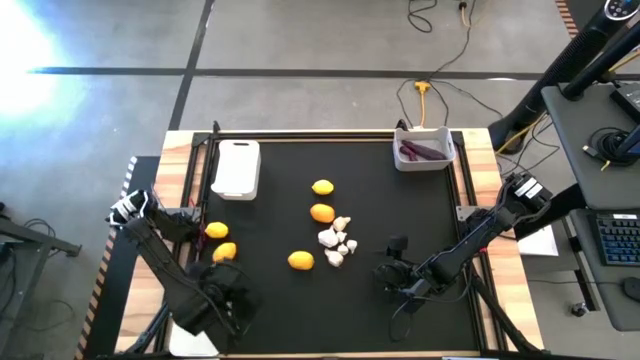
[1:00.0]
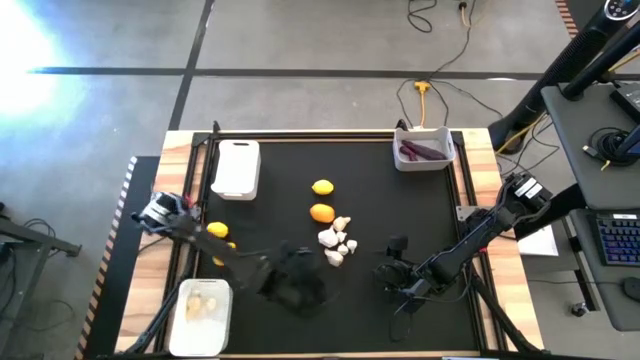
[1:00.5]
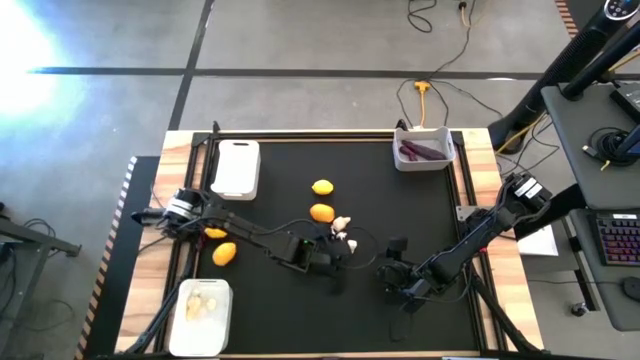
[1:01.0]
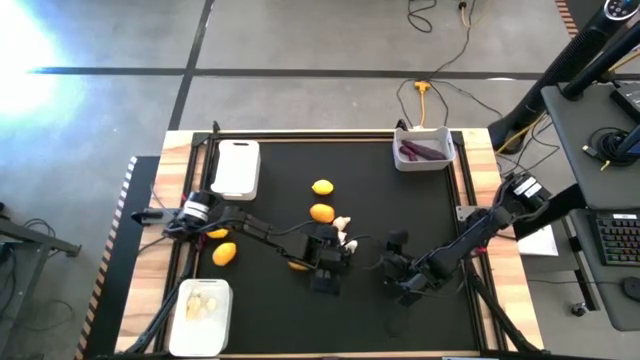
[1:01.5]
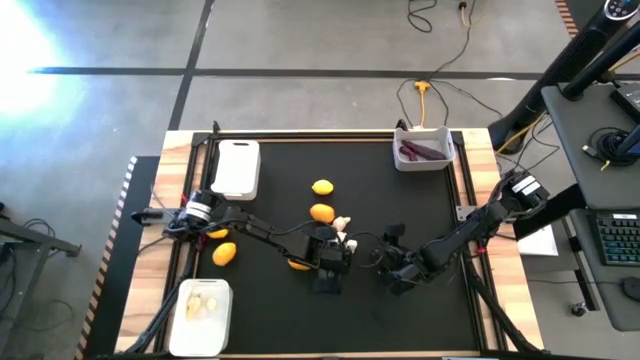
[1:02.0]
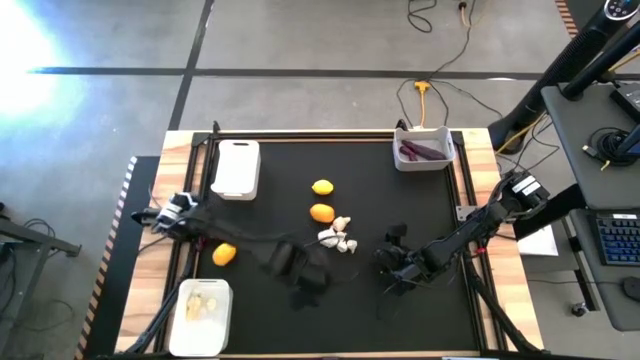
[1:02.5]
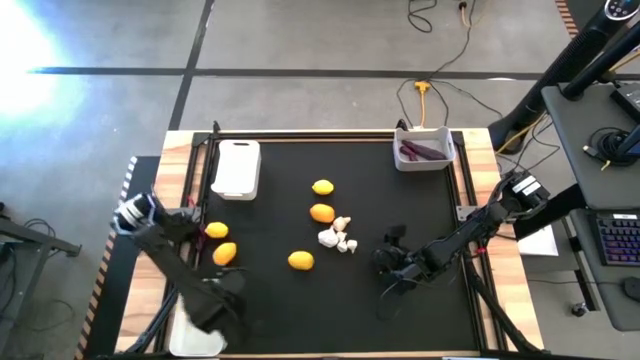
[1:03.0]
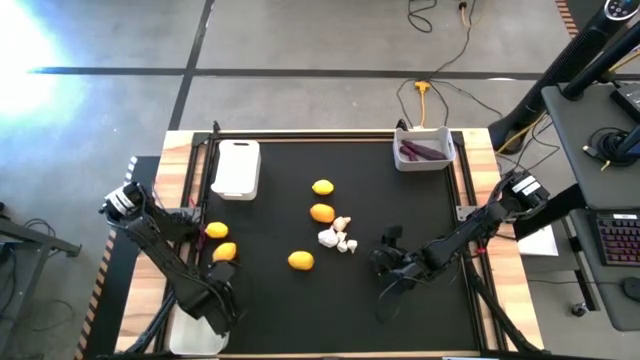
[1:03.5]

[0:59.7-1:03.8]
Task: Sort produce into baskets
Put the big garlic into the bottom white bin

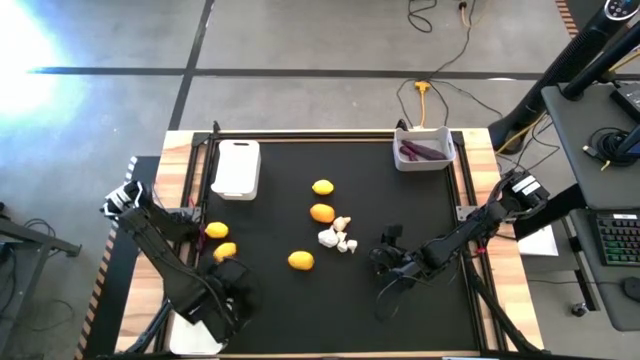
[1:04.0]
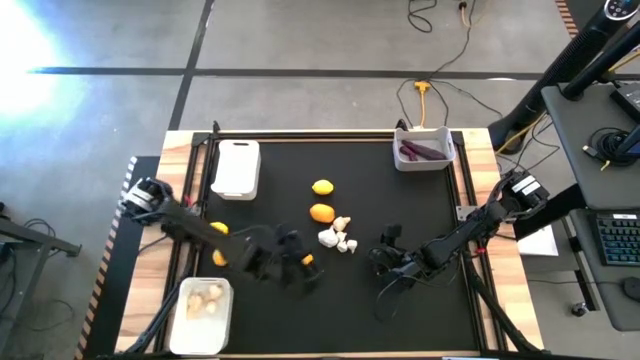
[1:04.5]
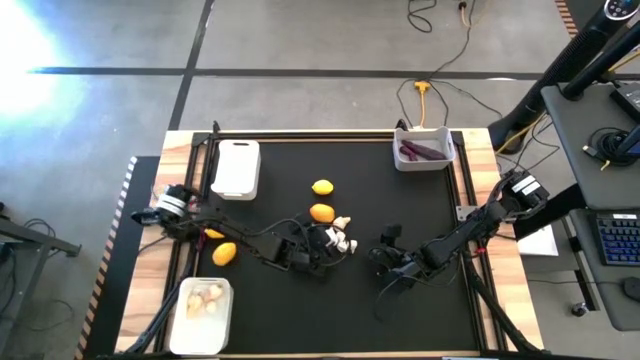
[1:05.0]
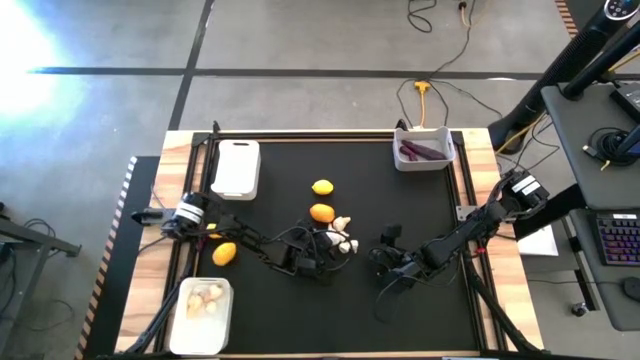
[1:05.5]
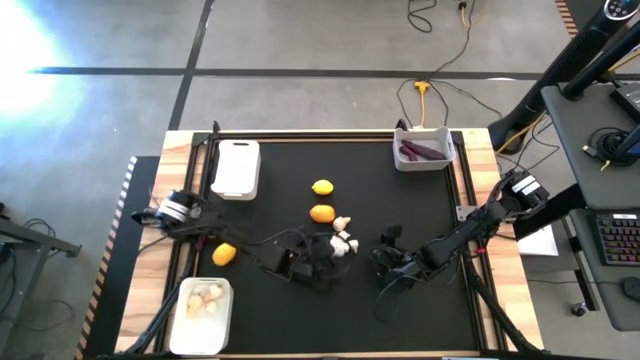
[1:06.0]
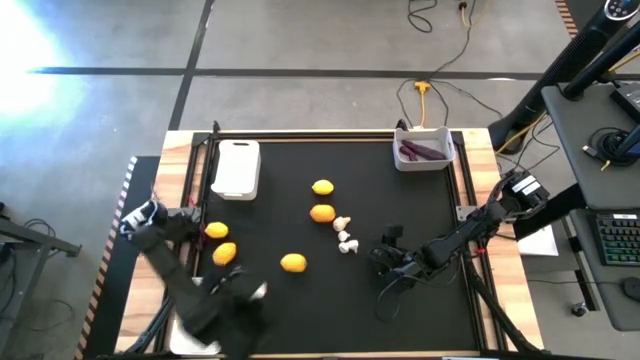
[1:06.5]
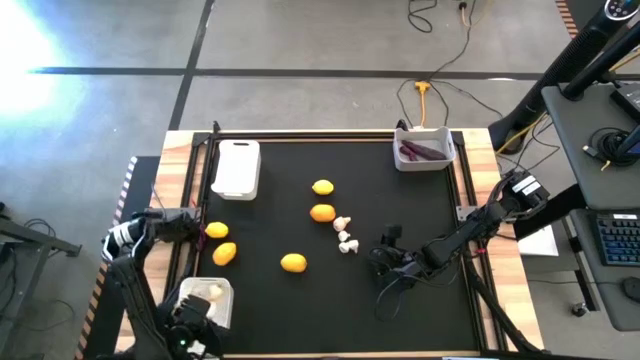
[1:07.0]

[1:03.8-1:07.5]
Put the big garlic into the bottom white bin

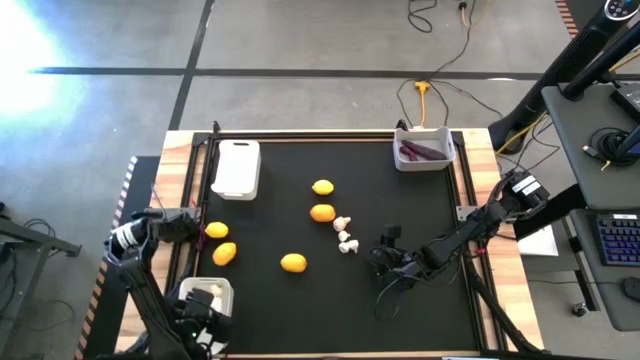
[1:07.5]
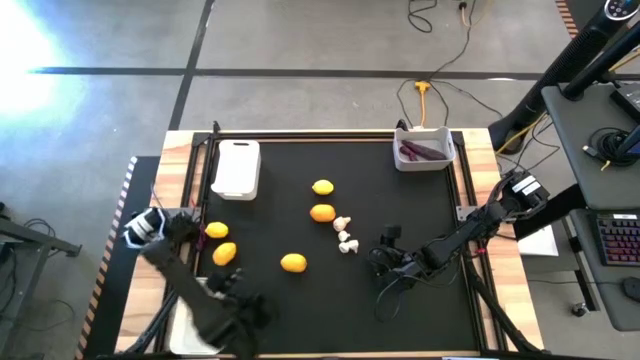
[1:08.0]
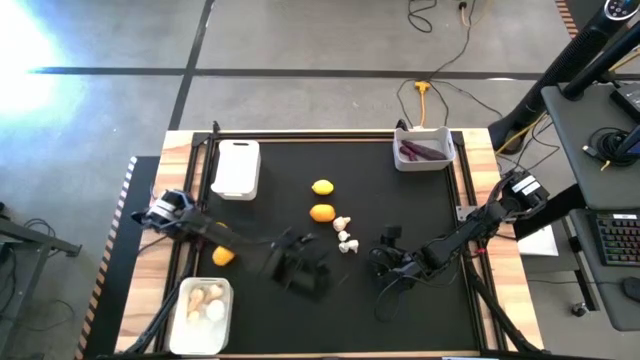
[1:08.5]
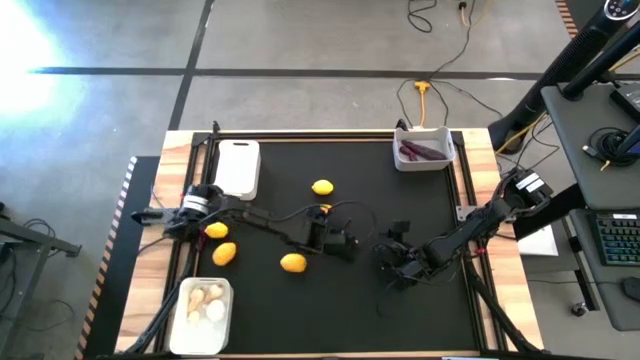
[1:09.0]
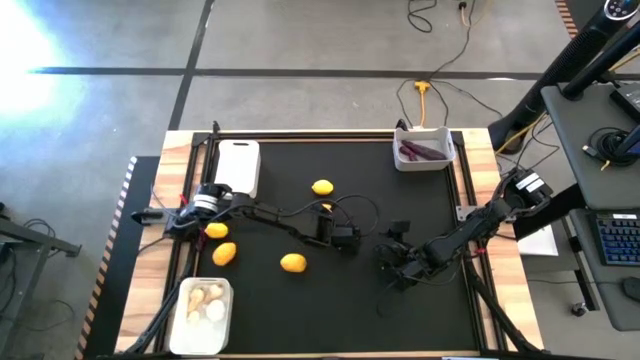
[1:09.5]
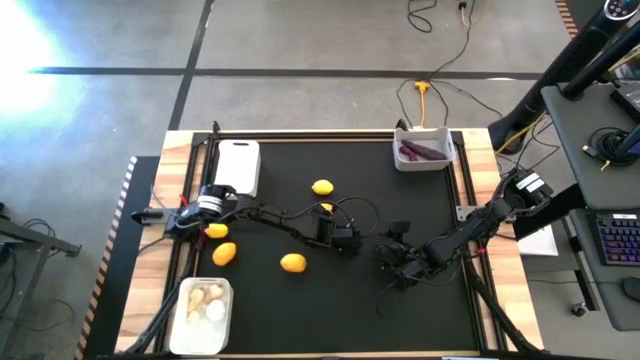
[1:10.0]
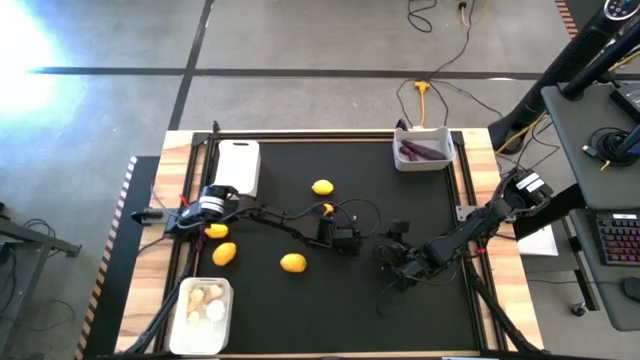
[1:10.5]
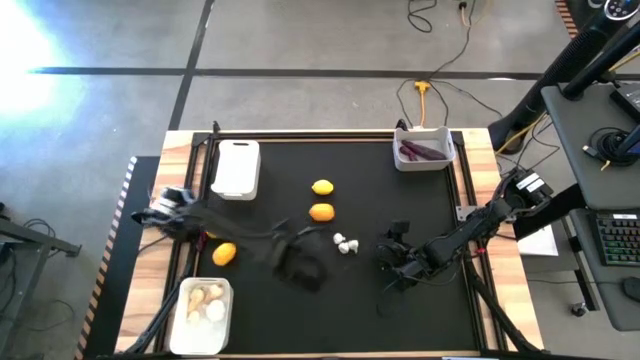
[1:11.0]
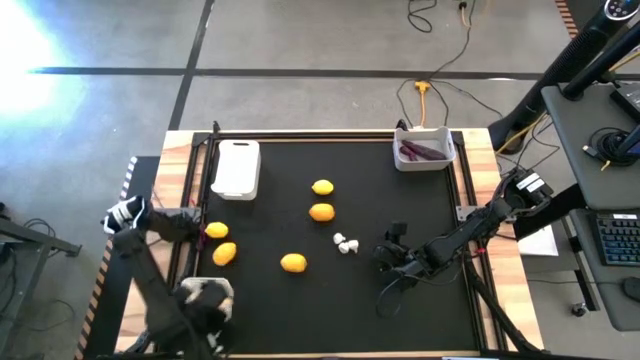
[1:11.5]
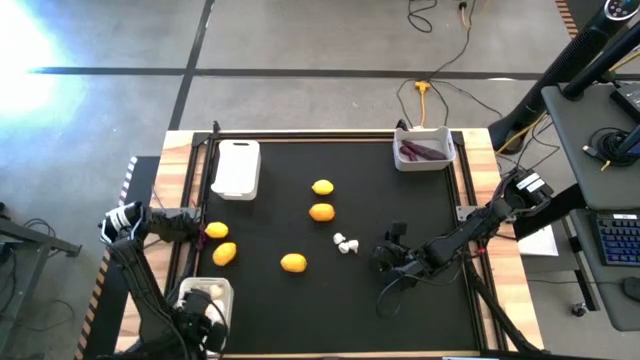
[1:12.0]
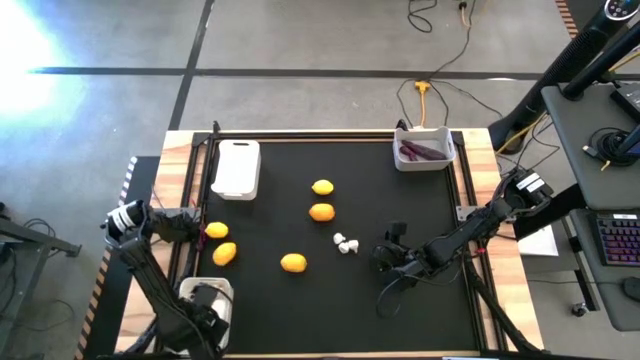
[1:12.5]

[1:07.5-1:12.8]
Put the big garlic into the bottom white bin

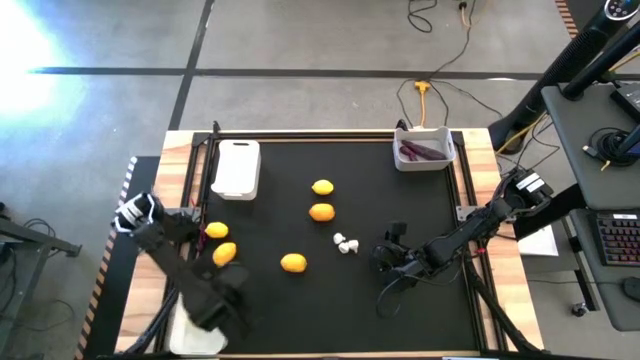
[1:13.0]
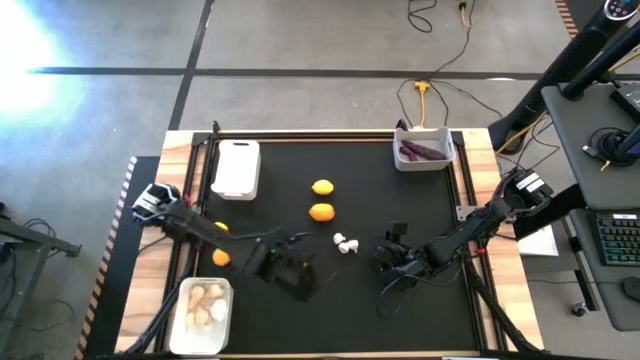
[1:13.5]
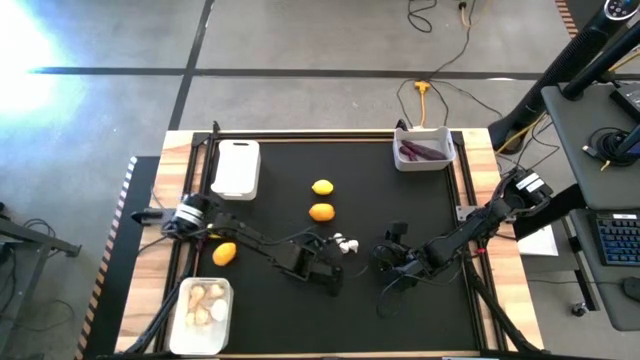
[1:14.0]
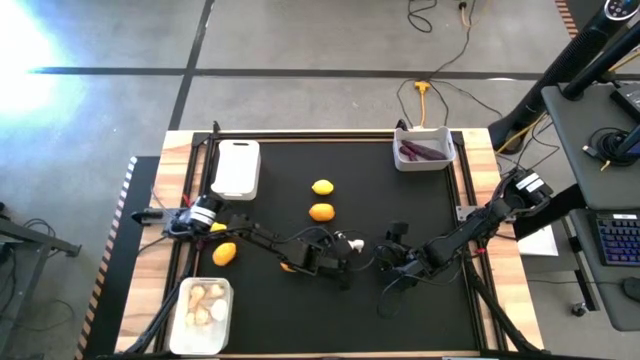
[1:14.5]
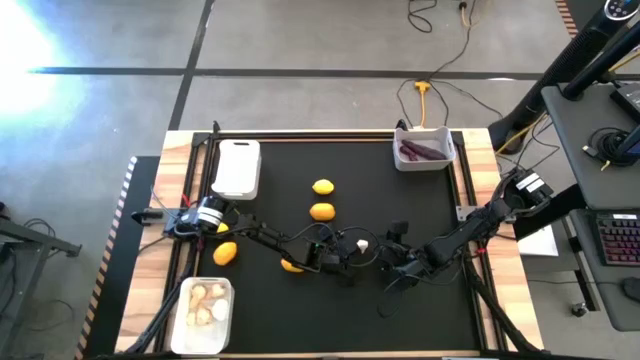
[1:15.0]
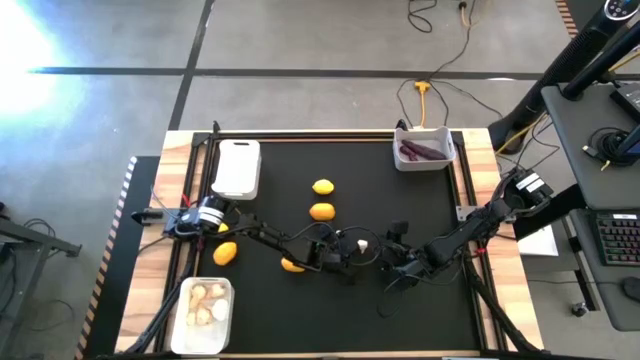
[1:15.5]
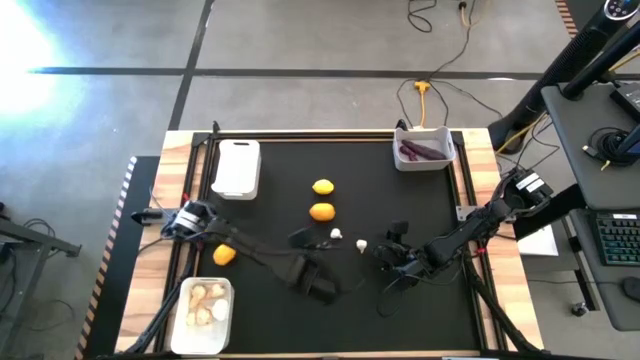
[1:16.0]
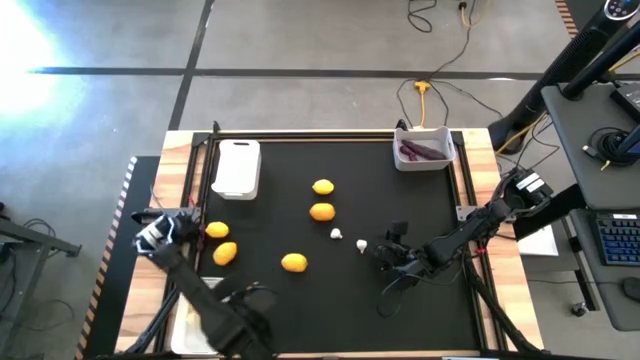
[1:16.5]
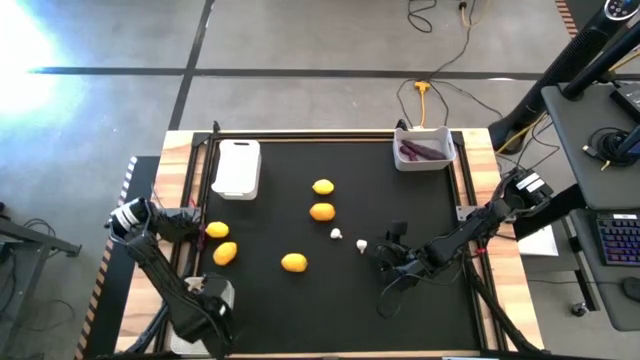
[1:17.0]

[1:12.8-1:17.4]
Put the small garlic into the bottom white bin

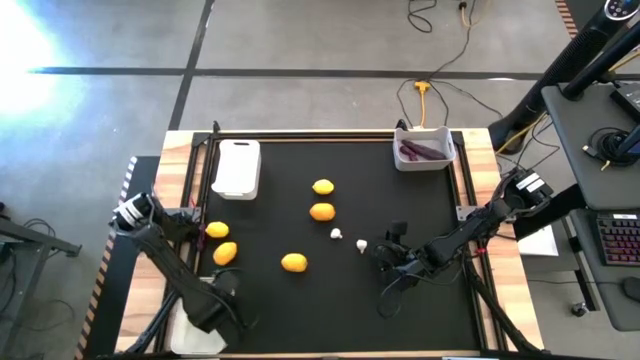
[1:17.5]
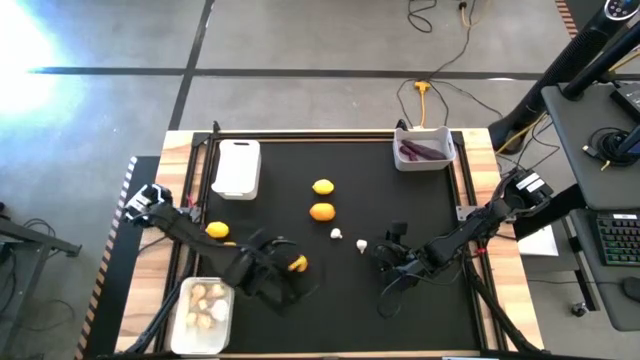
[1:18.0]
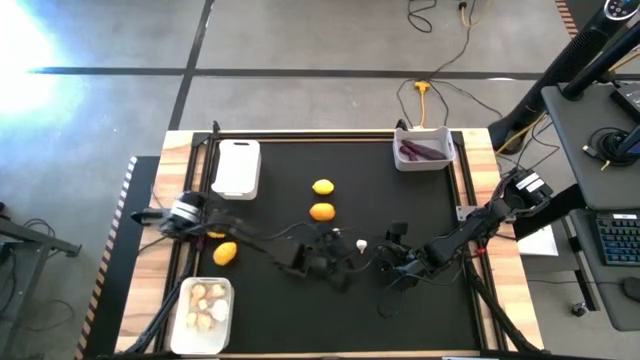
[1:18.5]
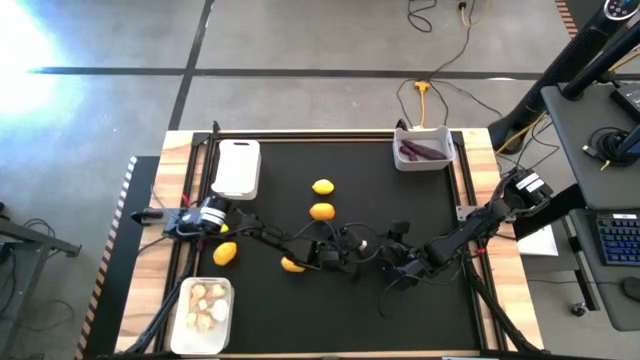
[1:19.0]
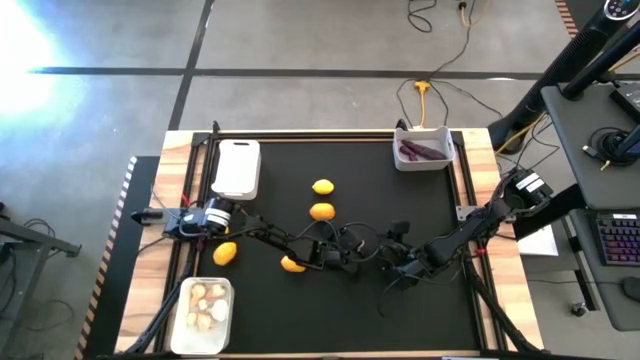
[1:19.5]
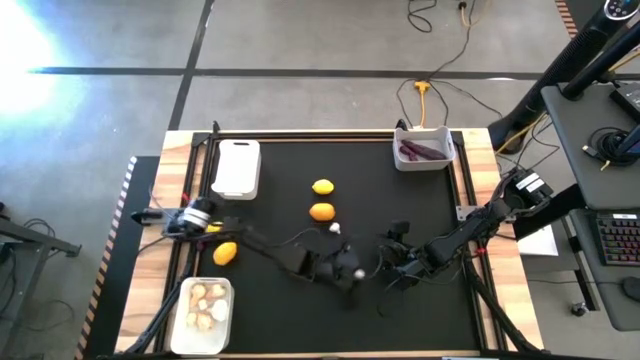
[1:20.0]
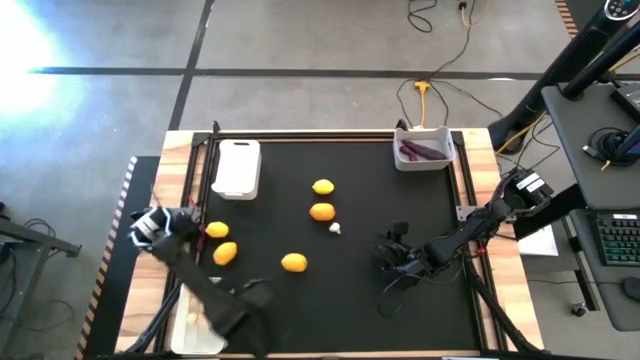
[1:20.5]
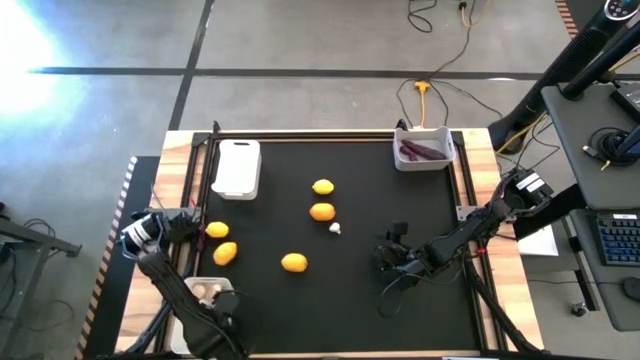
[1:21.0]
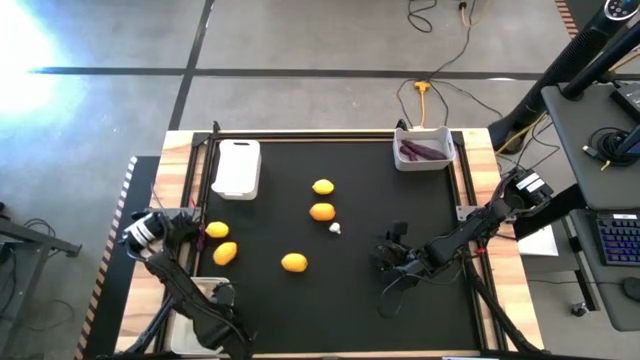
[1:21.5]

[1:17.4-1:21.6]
Put the small garlic into the bottom white bin
